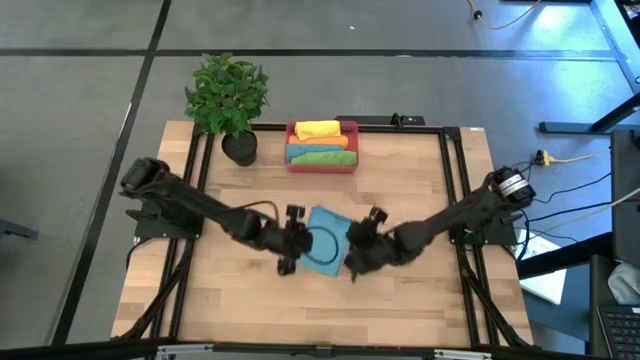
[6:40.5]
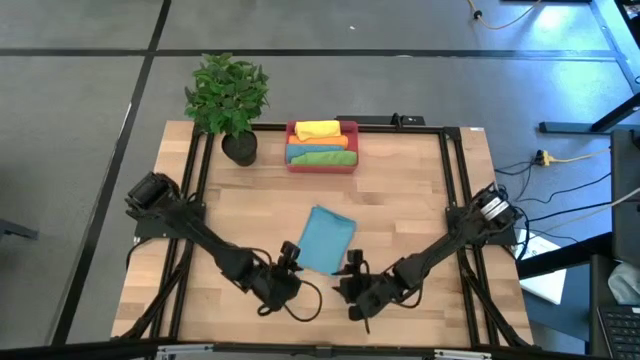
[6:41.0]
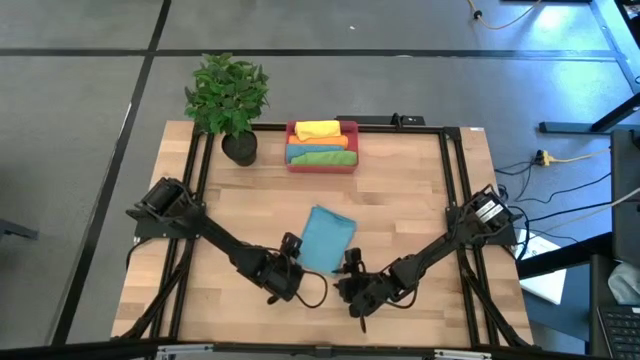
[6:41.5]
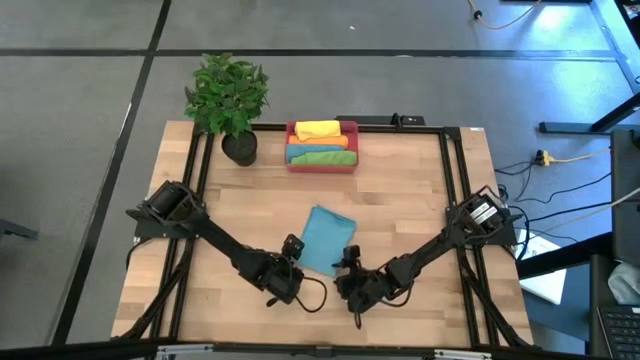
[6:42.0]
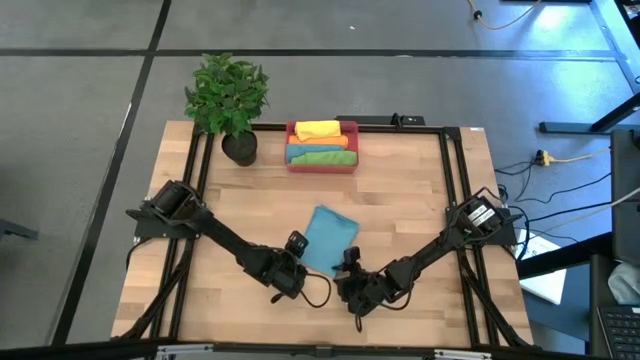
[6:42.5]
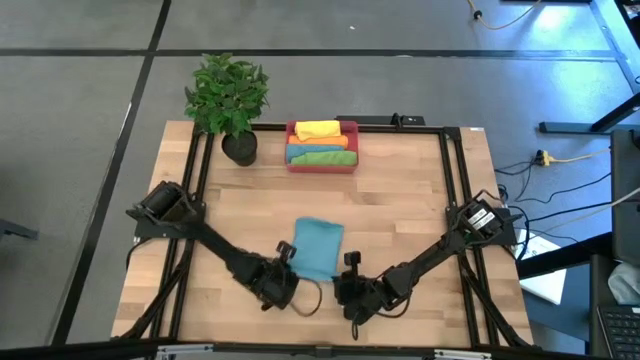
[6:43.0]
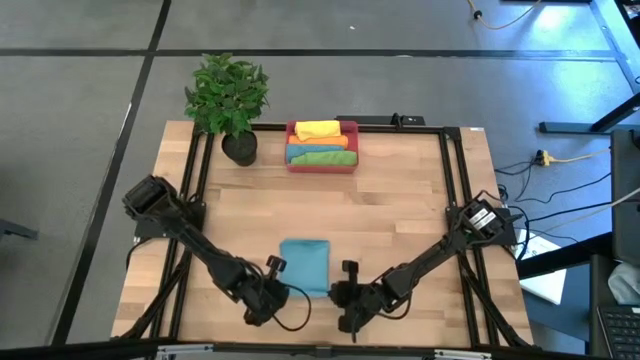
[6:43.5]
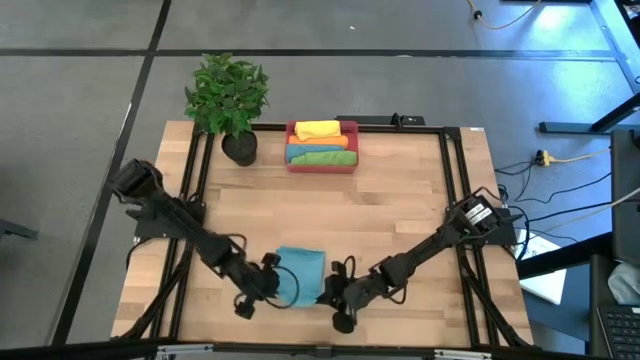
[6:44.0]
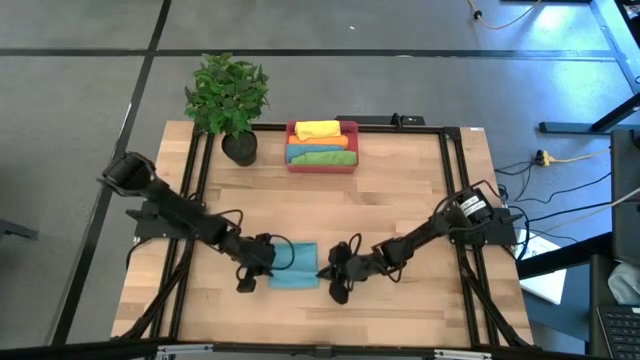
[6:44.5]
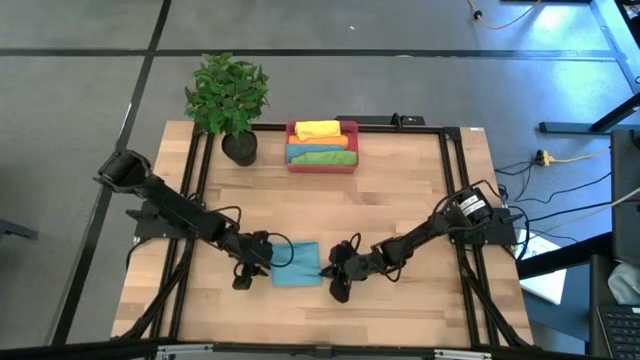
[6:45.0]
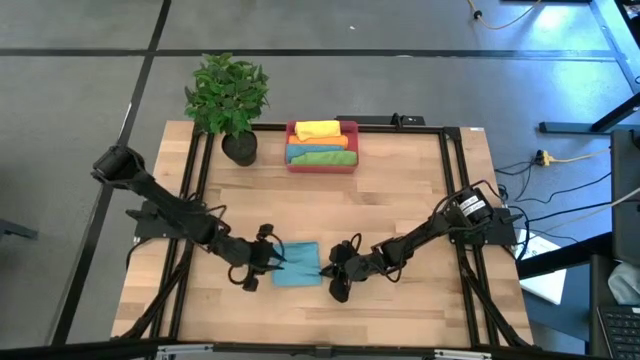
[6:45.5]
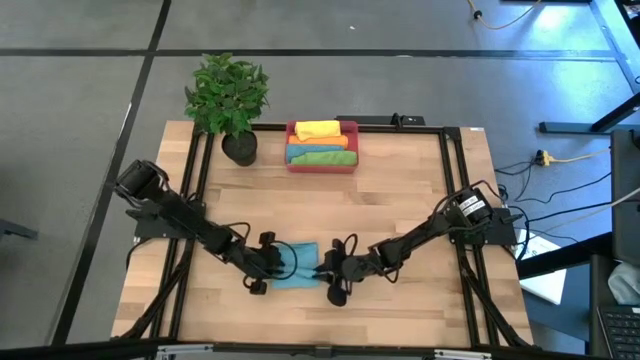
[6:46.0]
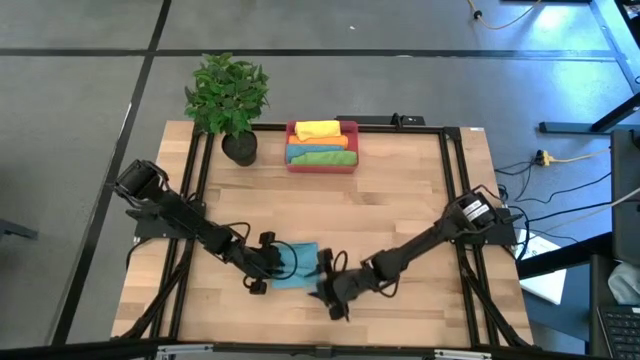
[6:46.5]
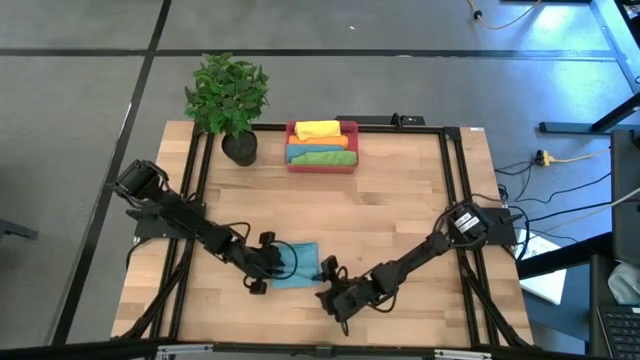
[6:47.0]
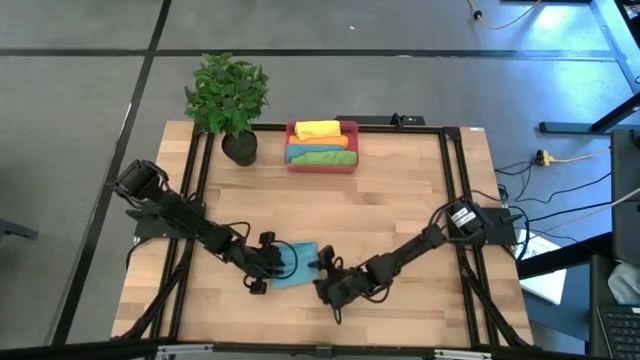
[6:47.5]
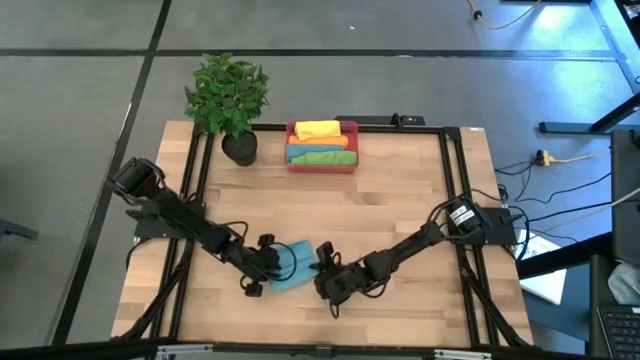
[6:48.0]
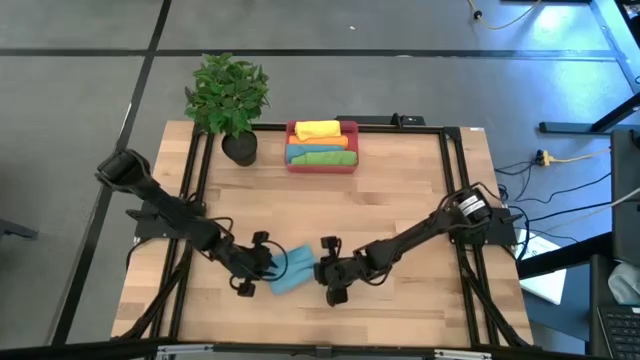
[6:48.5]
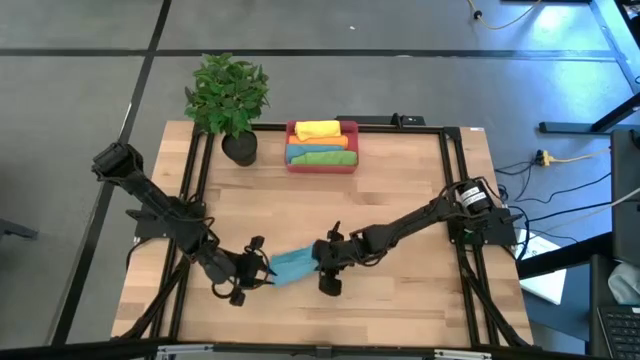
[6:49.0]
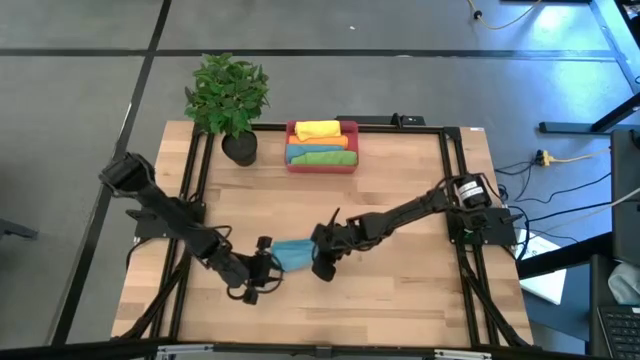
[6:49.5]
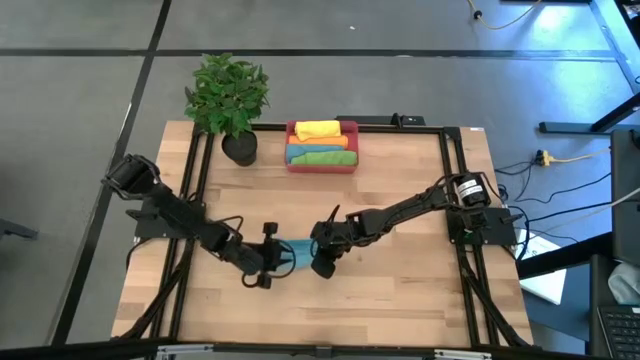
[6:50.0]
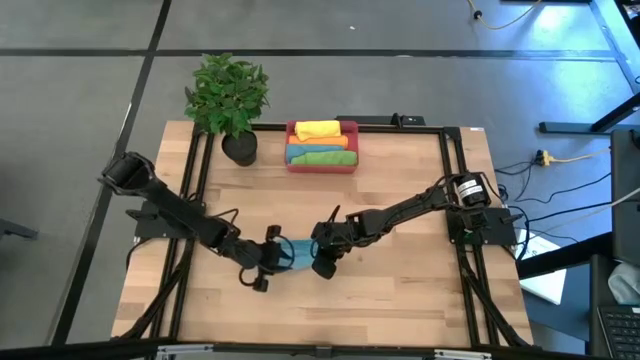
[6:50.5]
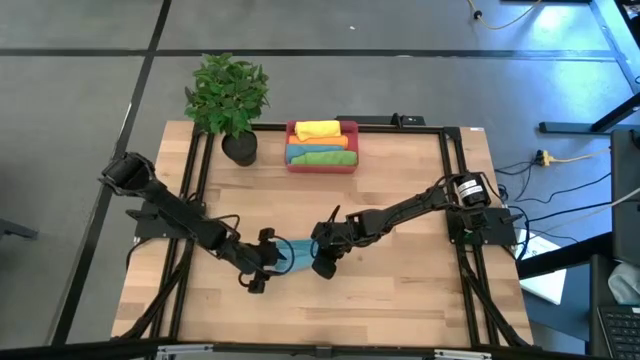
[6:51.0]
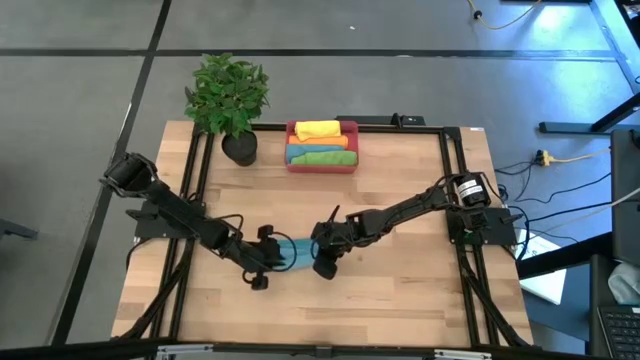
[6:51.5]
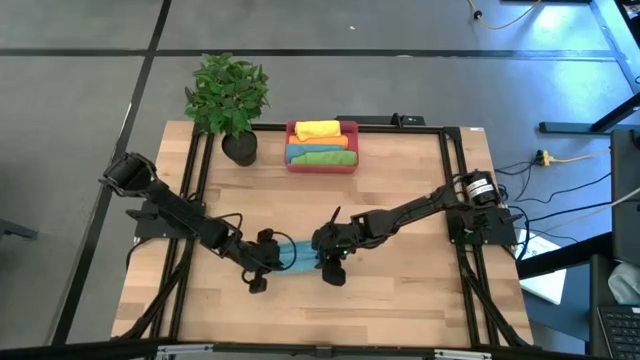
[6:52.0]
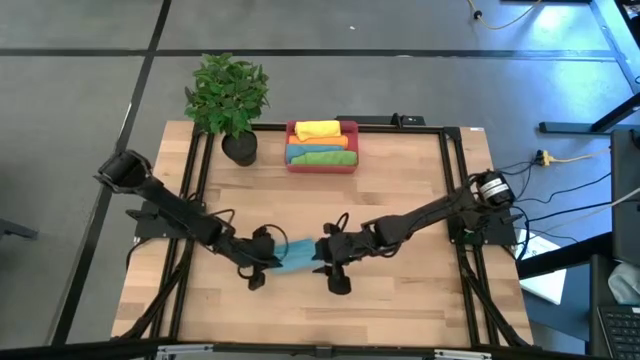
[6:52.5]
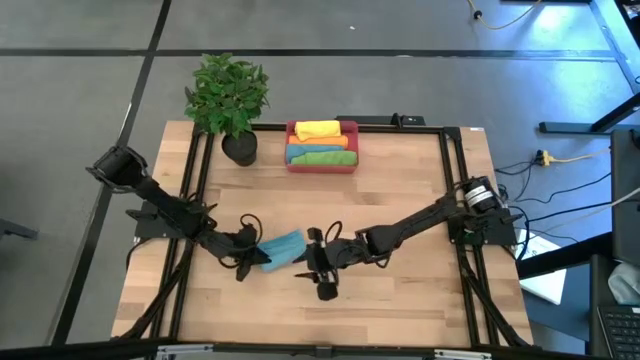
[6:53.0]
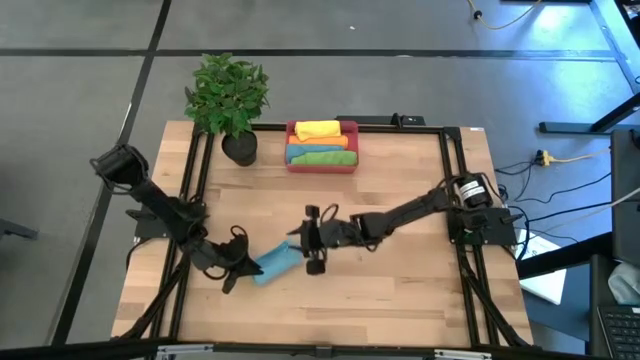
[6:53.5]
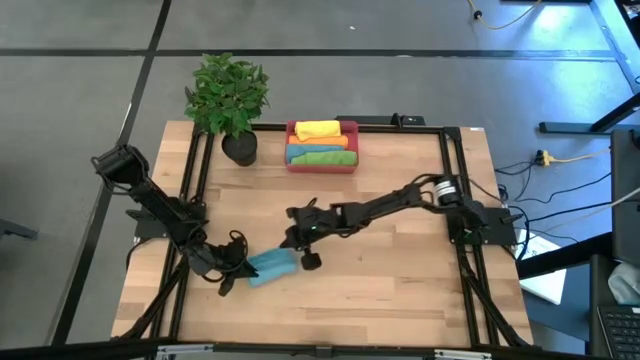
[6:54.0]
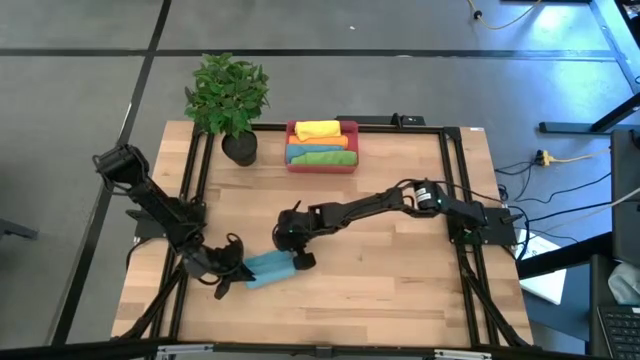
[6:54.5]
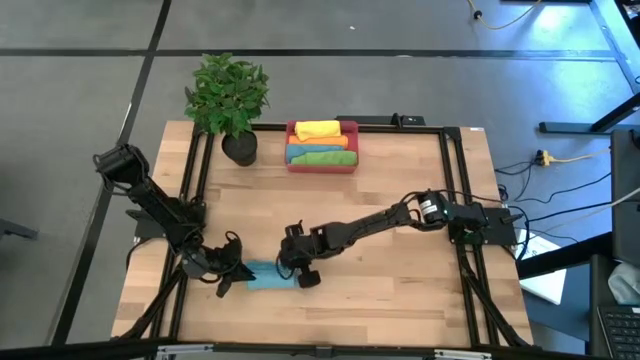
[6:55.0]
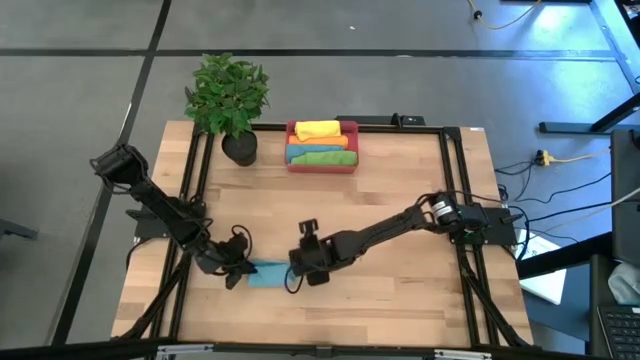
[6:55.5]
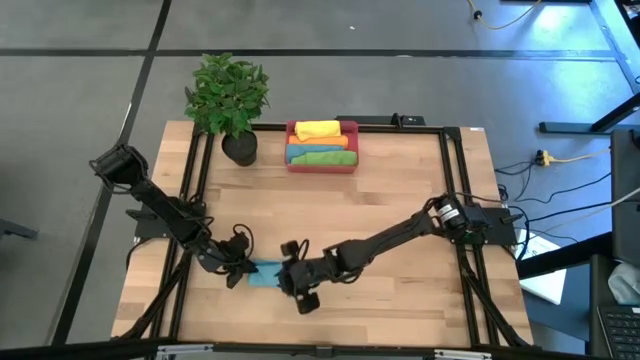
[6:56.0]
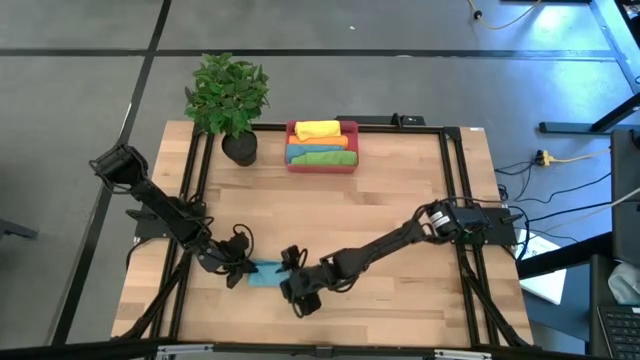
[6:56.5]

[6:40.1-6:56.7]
Task: Roll microfiber towels into tight, uniform cylinder then place into a basket
Roll the blue towel

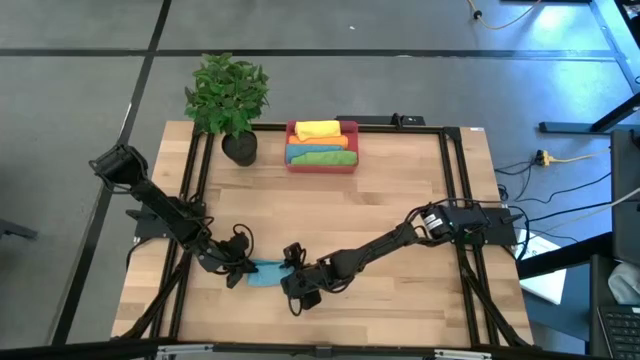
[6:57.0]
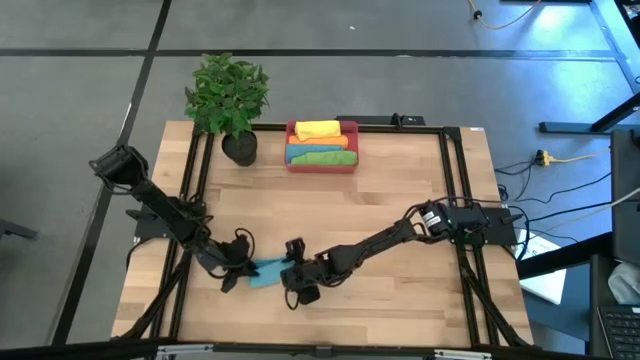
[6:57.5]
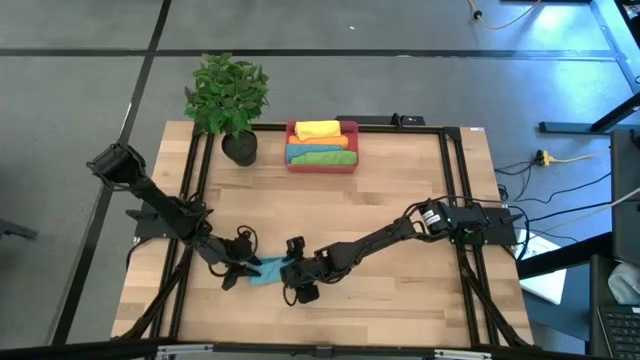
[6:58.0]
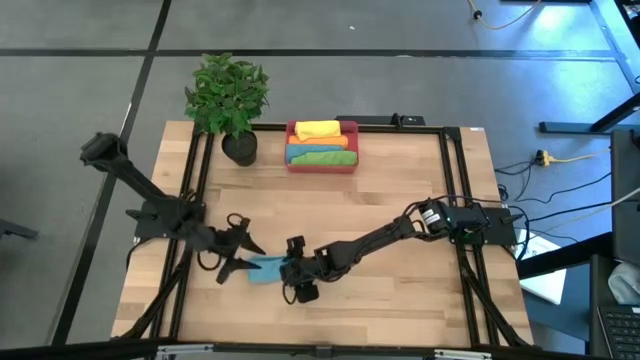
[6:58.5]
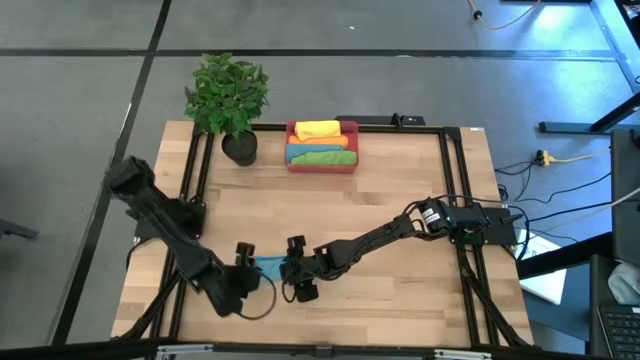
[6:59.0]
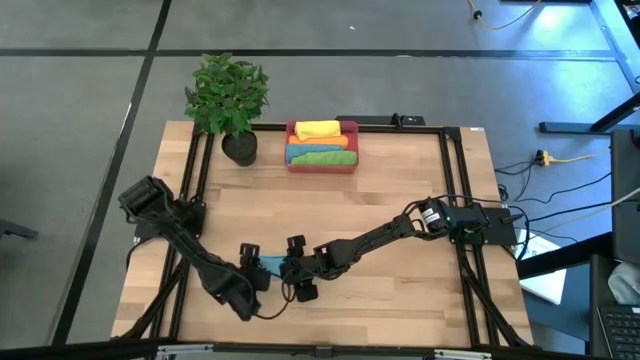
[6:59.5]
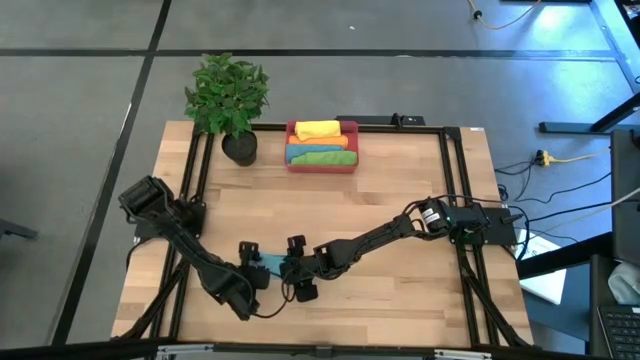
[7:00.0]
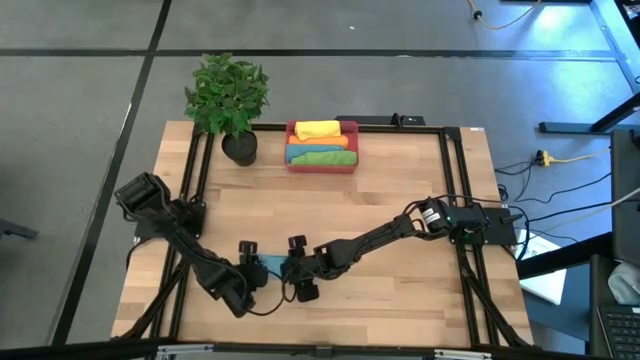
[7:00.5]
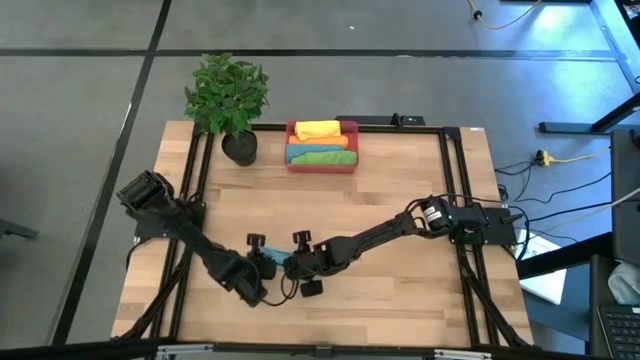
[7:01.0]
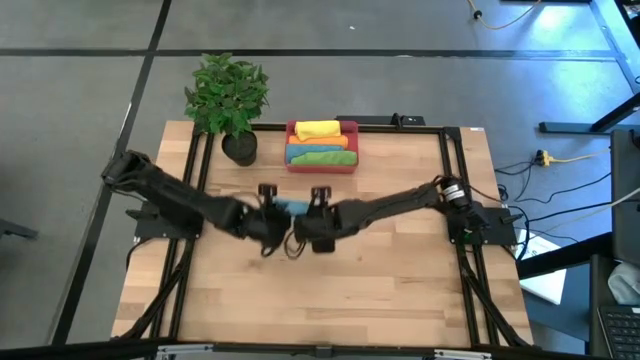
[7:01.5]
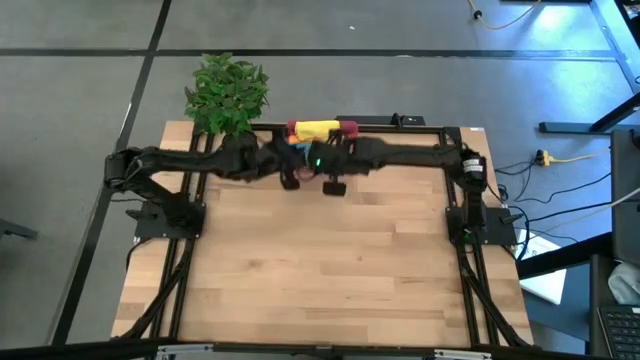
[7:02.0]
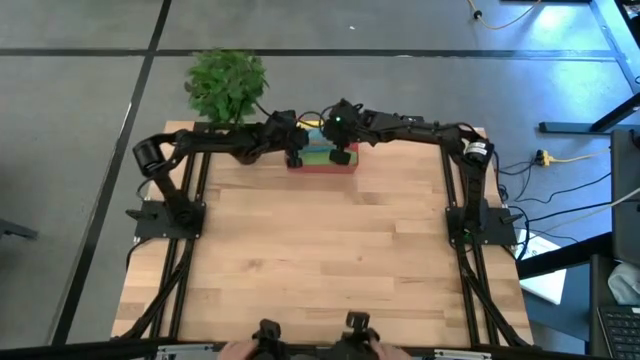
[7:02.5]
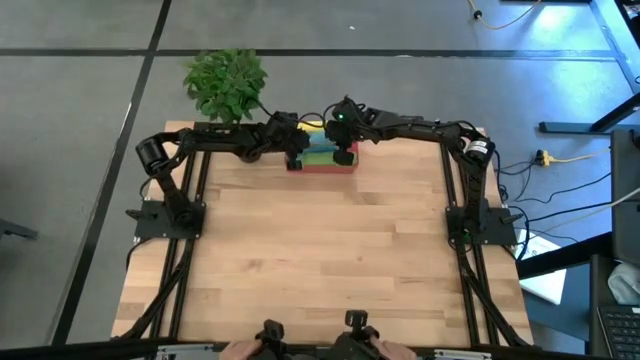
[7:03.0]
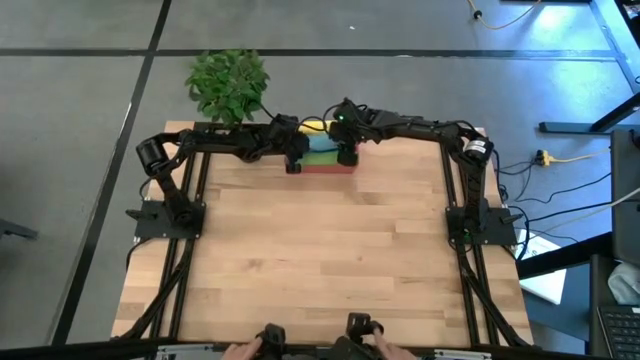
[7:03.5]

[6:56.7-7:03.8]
Put the rolled blue towel into the red bin
